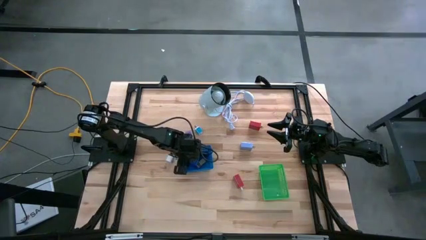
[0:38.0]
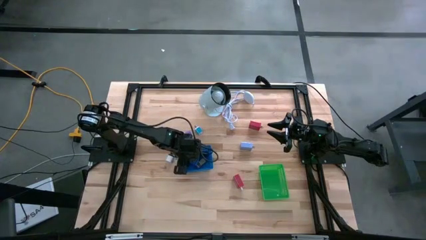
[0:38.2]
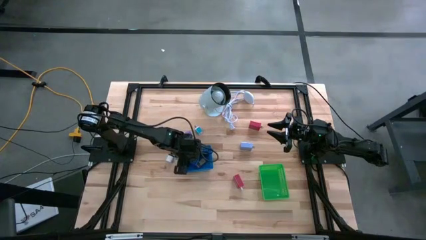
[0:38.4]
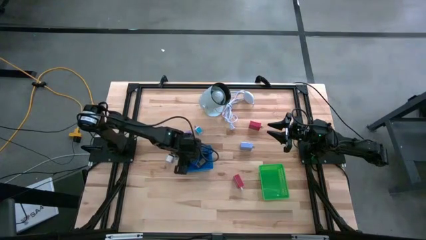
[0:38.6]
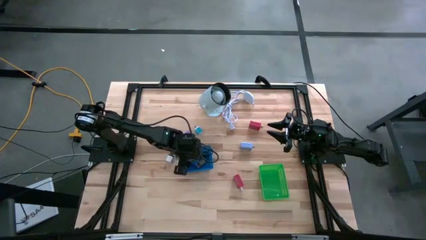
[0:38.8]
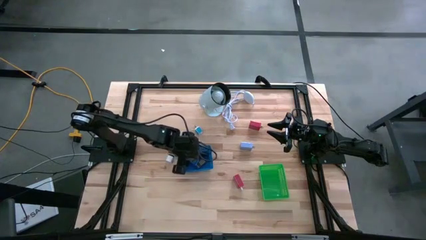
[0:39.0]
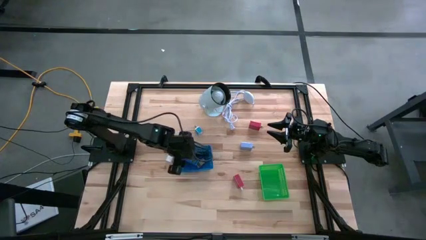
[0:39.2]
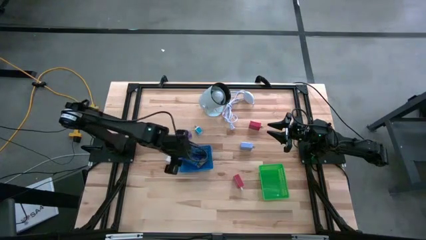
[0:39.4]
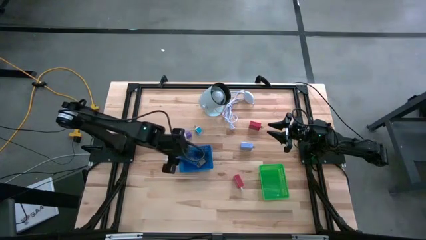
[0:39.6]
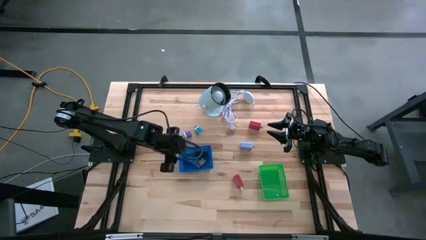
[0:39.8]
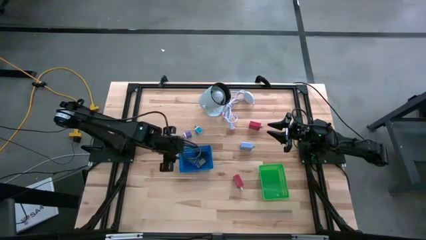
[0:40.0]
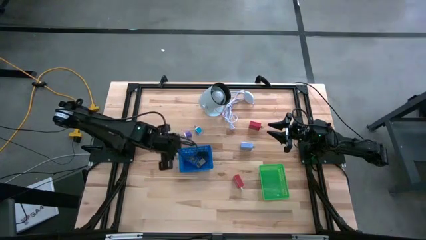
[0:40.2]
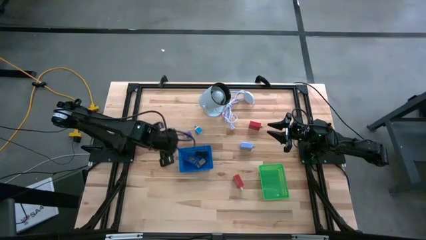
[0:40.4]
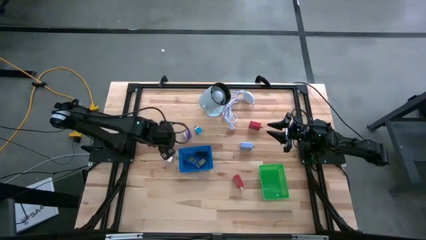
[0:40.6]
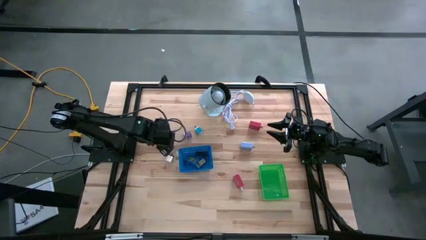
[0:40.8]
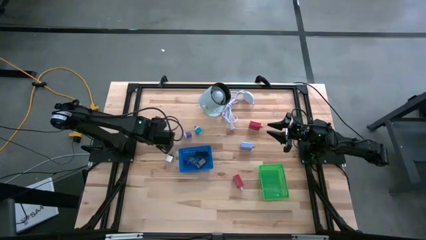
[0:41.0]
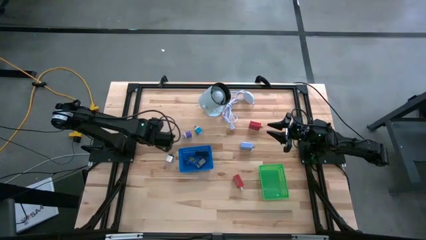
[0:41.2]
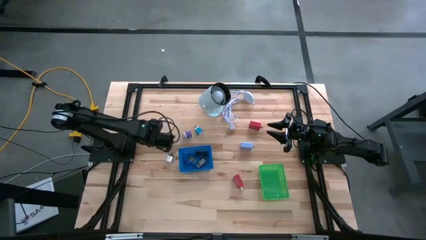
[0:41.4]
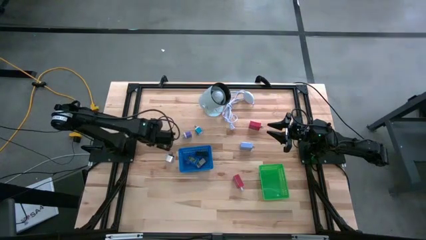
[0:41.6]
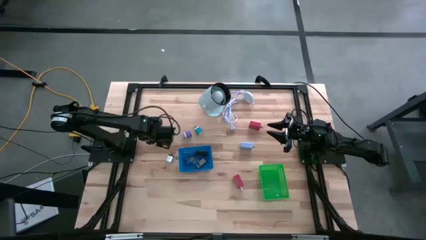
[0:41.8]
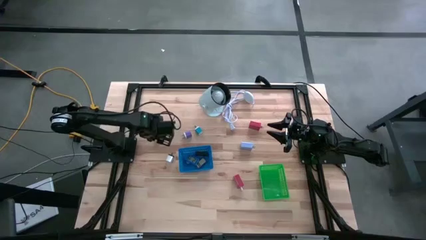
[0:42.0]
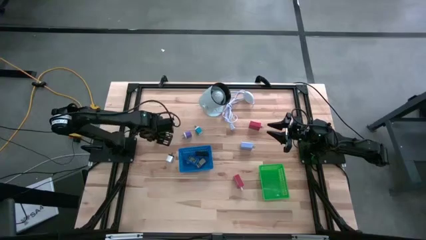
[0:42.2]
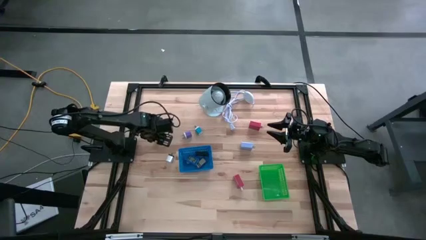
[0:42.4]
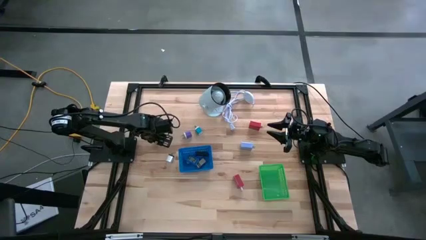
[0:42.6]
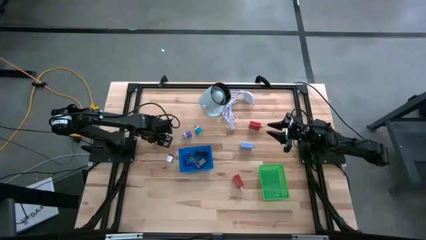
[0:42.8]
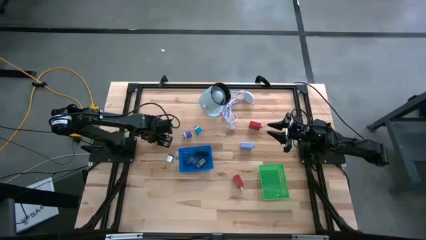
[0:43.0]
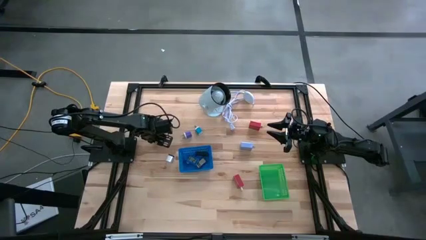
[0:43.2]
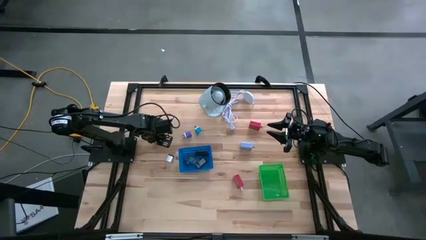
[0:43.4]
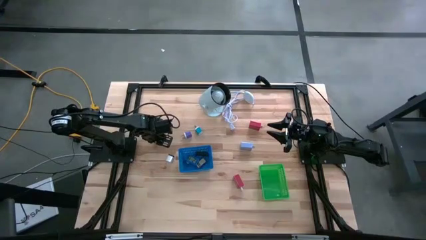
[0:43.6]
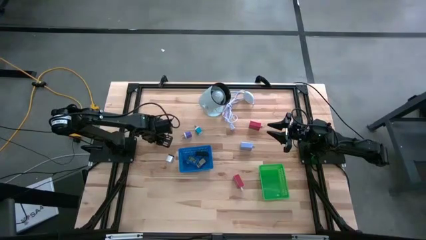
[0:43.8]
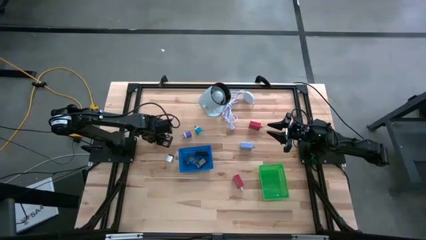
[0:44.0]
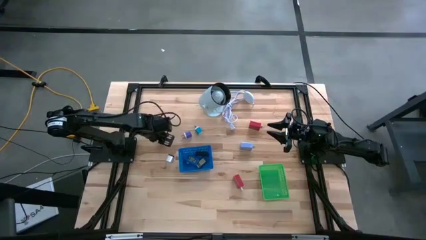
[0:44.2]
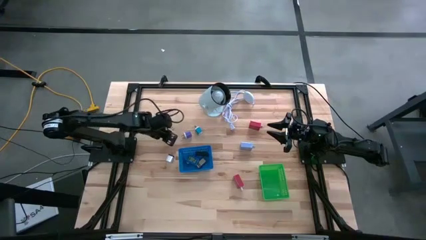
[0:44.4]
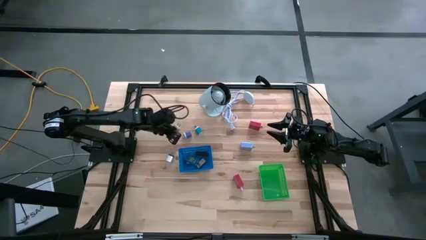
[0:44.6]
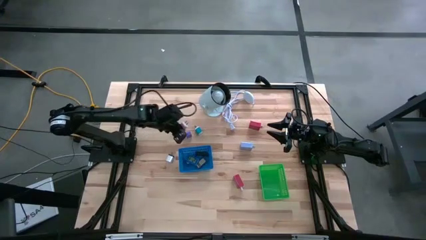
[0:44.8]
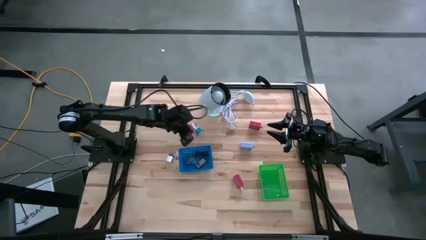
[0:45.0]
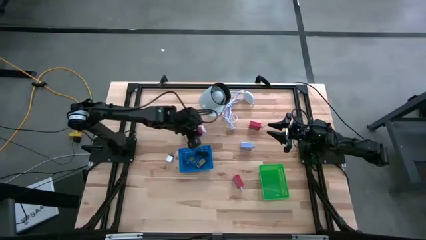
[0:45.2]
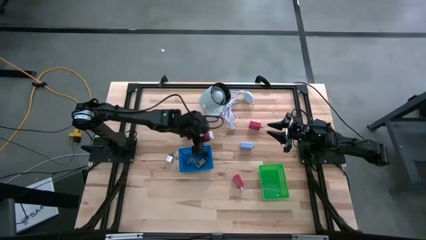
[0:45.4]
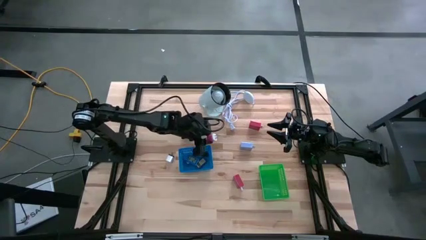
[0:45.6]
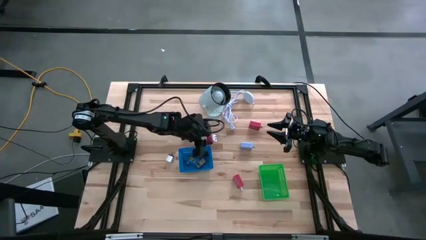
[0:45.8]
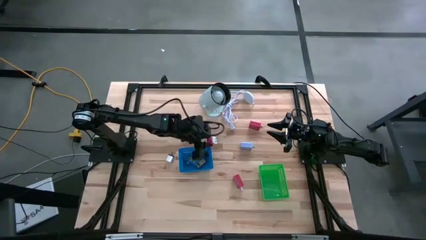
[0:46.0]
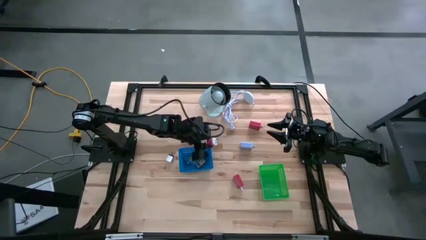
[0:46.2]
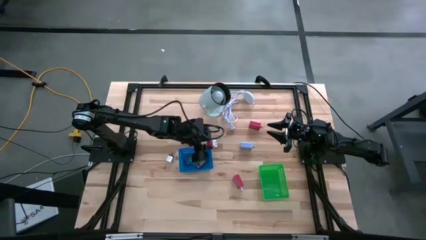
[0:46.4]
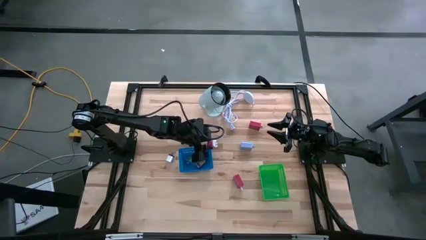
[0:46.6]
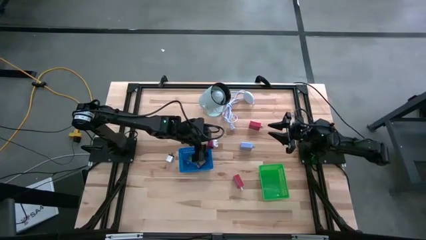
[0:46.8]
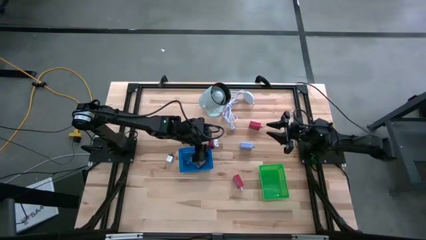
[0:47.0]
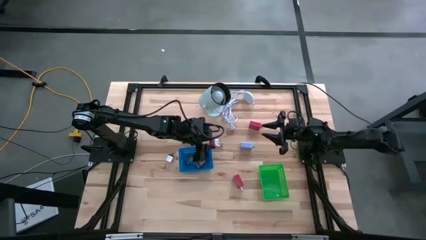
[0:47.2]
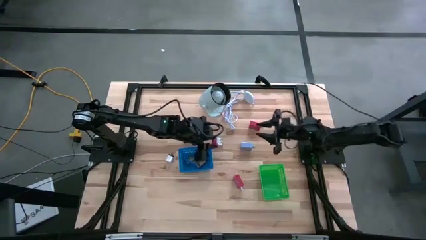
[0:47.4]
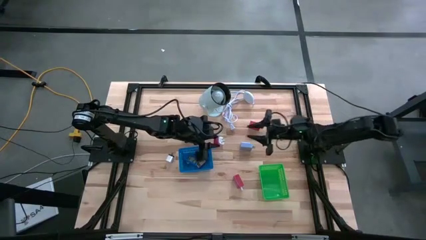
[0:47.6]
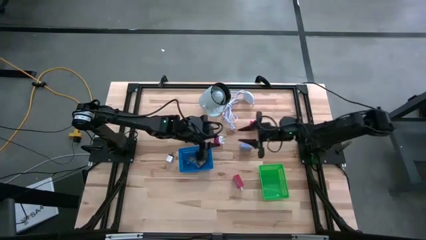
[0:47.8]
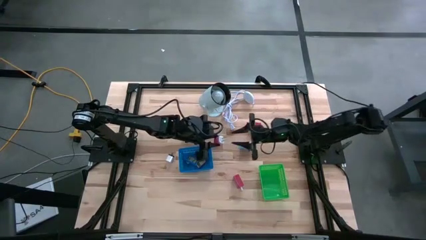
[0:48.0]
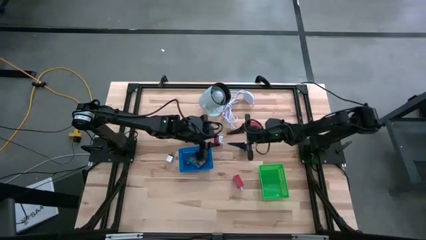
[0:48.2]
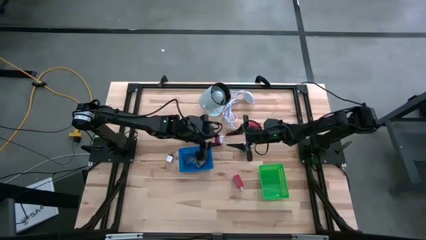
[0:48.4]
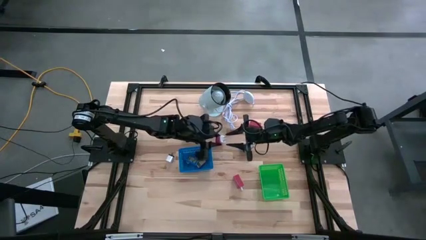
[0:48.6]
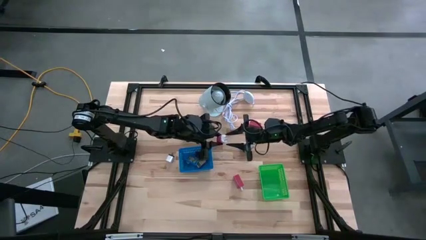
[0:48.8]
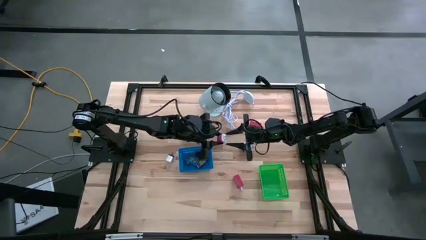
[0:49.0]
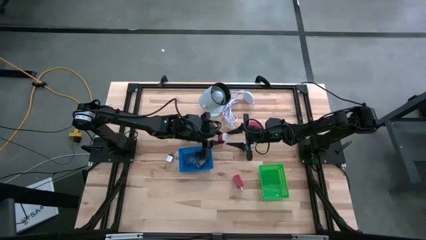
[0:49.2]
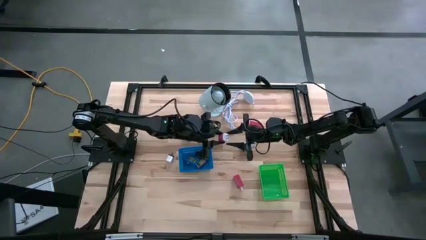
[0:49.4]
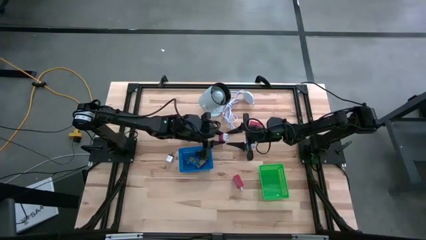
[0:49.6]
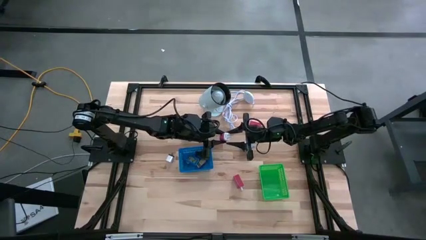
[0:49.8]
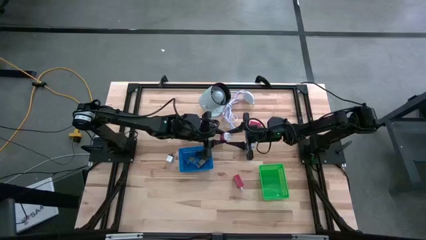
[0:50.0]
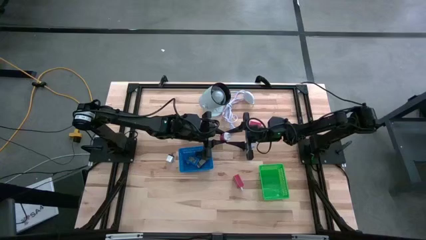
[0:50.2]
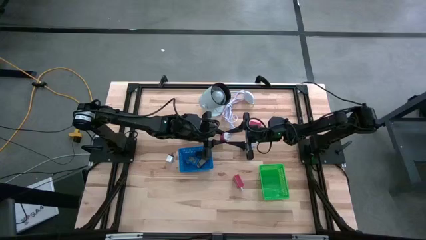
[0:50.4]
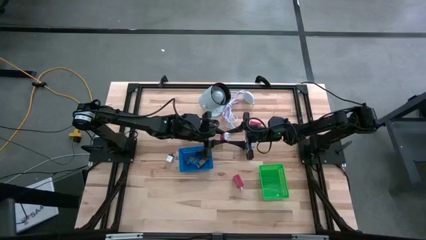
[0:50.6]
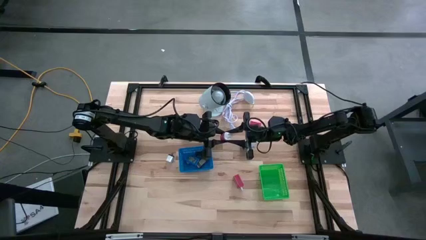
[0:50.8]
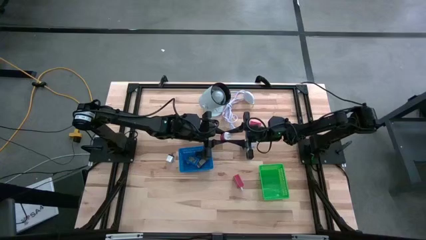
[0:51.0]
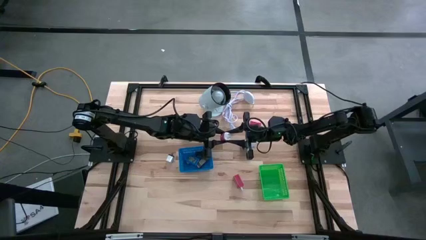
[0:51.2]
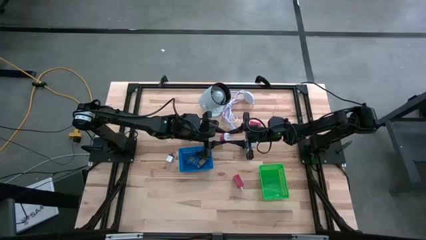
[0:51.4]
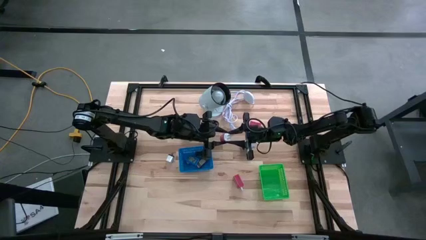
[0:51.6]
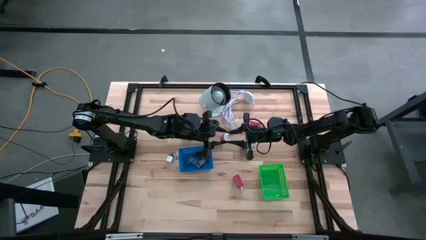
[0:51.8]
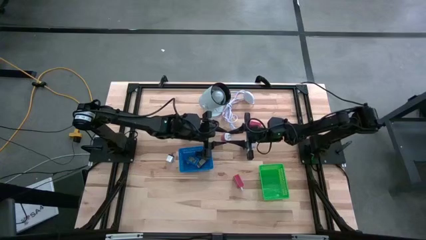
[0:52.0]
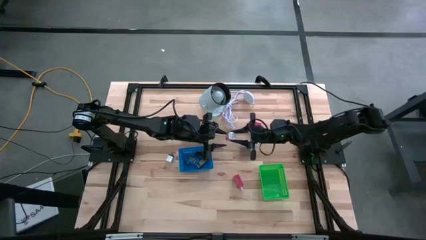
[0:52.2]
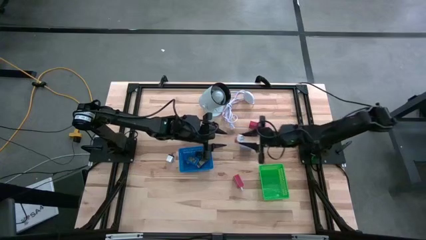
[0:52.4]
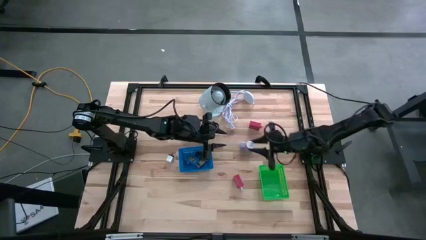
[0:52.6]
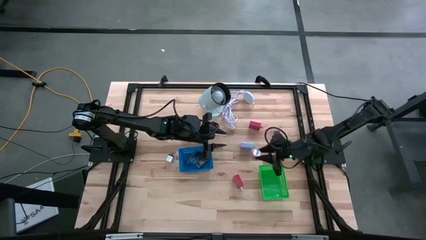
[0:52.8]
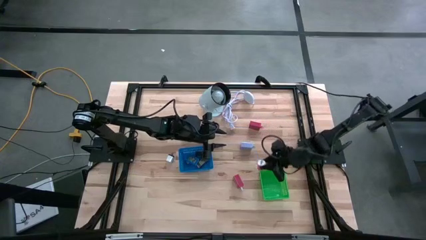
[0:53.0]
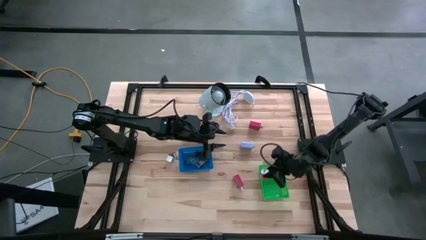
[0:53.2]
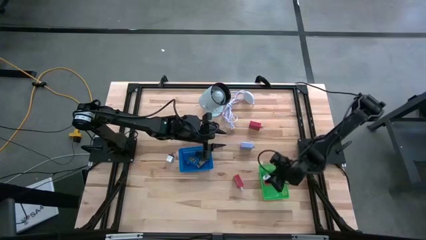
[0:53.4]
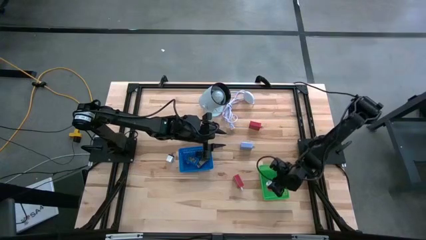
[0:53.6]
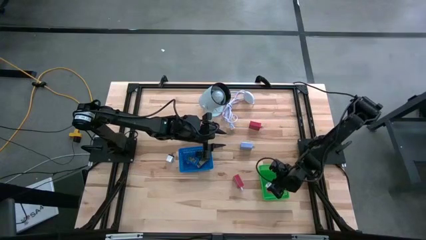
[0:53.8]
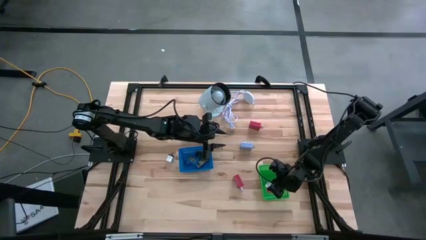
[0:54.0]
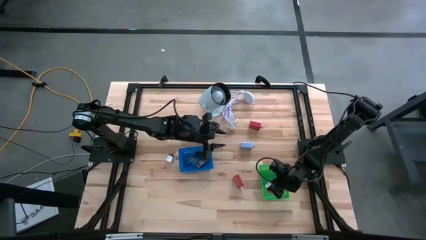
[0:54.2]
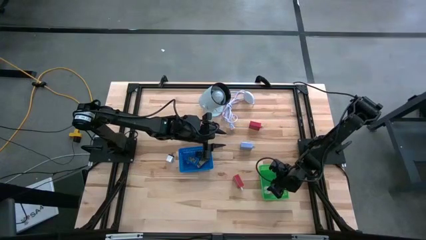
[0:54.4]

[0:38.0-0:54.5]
Task: Pick & Place Office items
Put the pink charger adapter into the green bin
